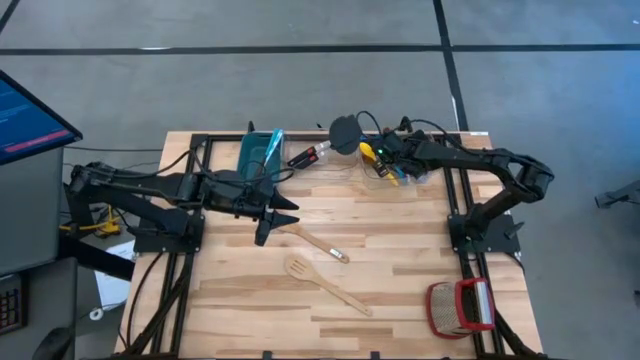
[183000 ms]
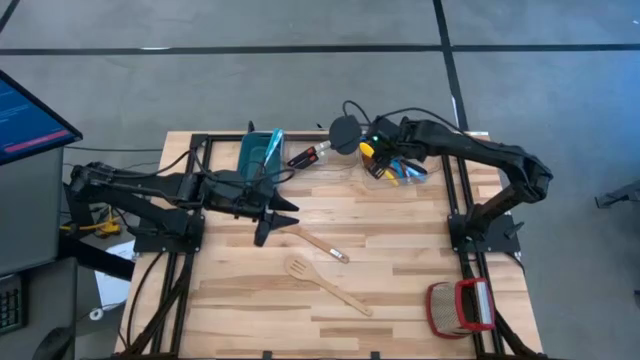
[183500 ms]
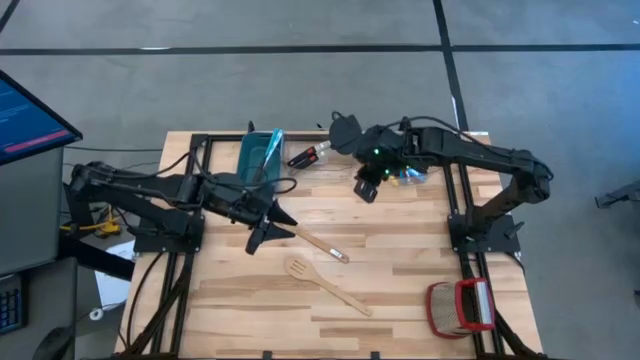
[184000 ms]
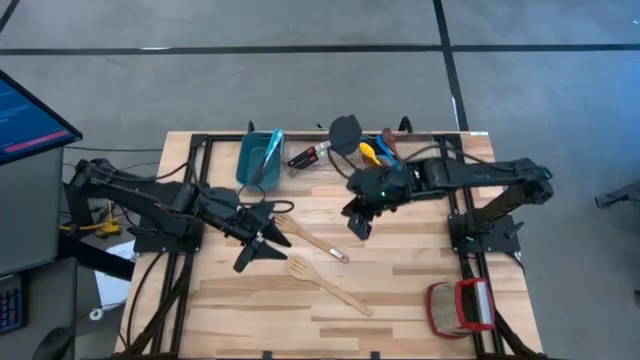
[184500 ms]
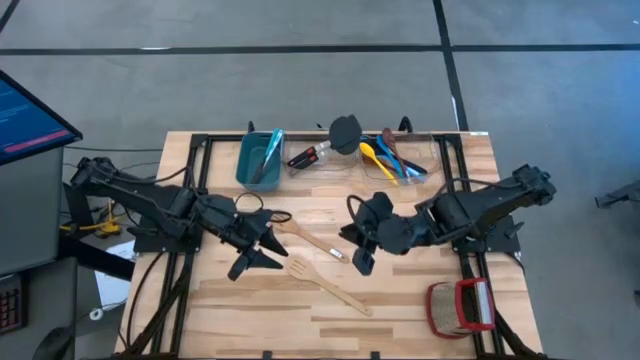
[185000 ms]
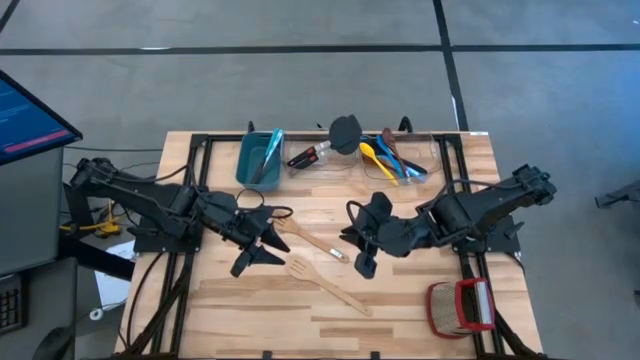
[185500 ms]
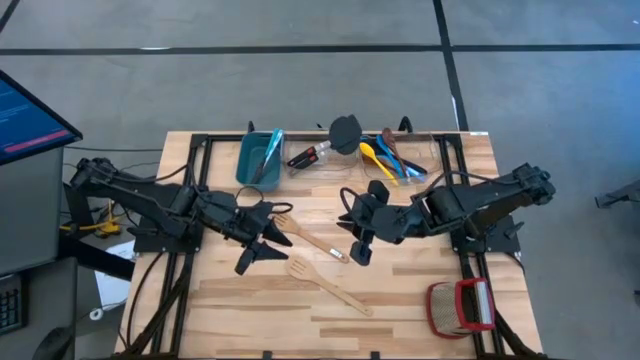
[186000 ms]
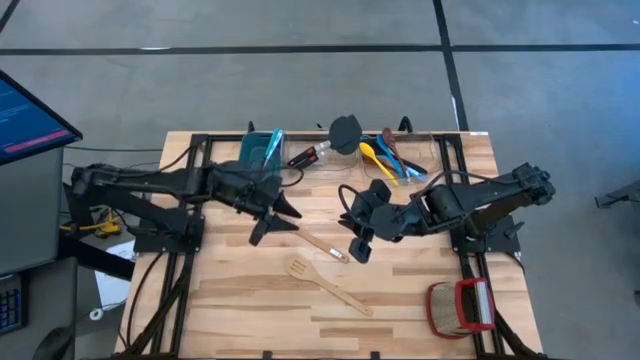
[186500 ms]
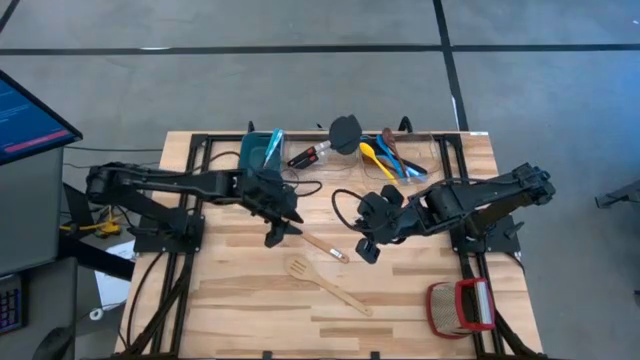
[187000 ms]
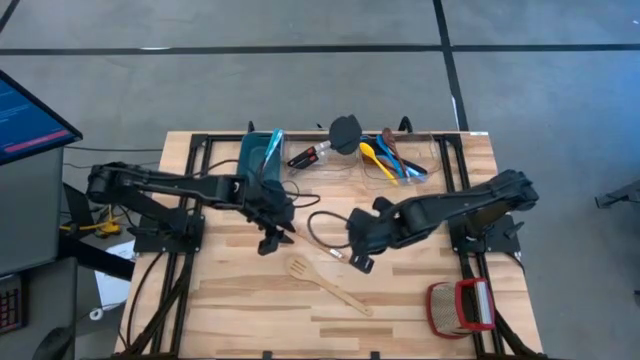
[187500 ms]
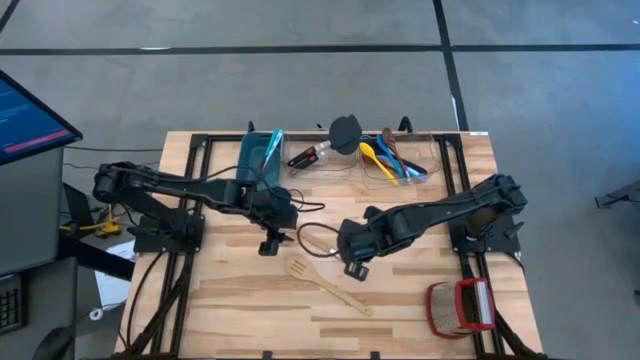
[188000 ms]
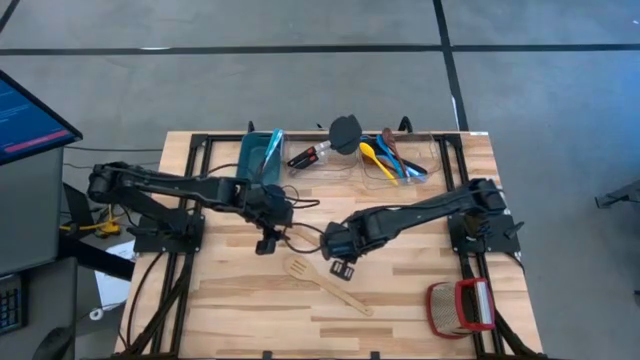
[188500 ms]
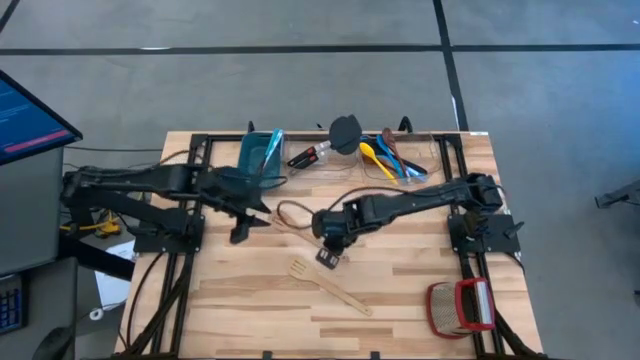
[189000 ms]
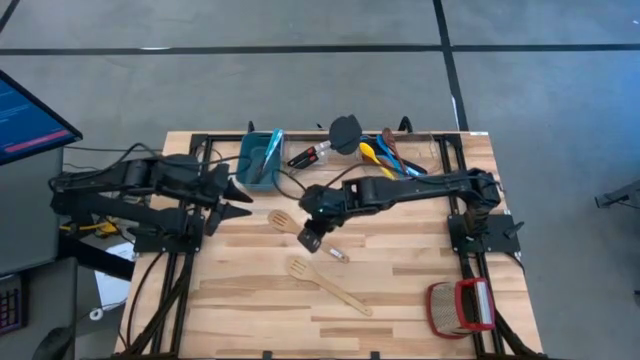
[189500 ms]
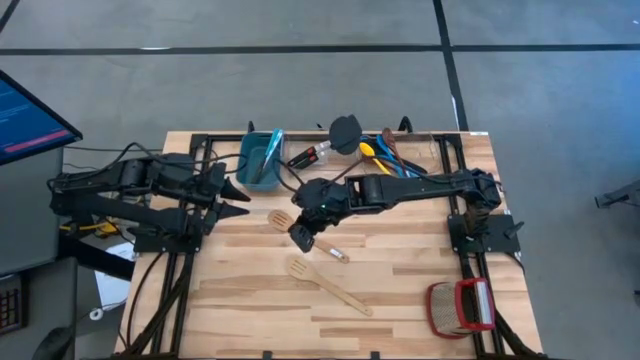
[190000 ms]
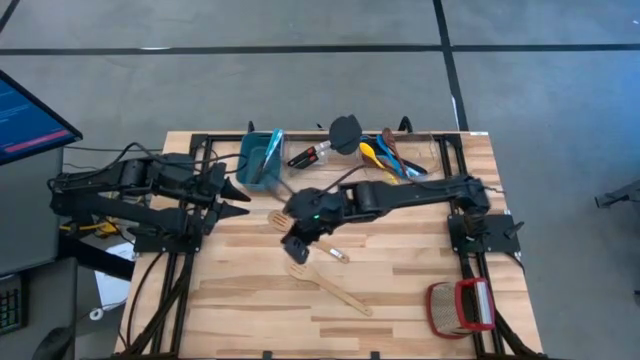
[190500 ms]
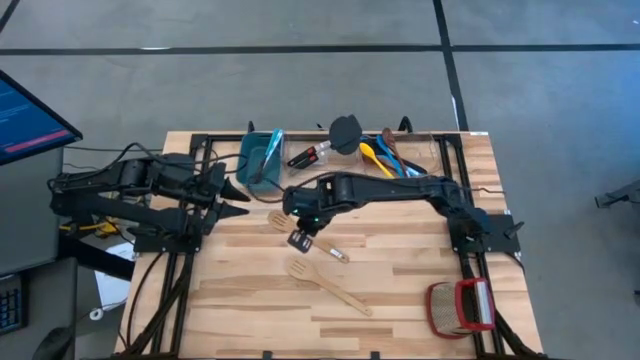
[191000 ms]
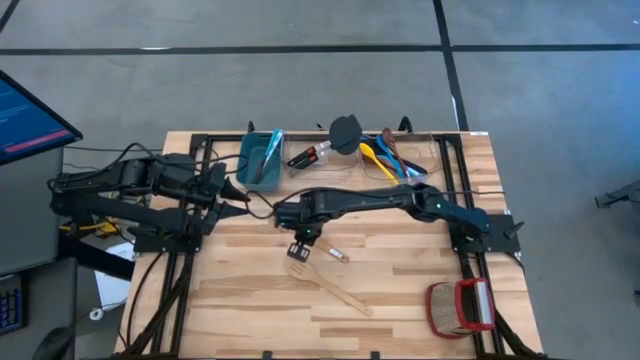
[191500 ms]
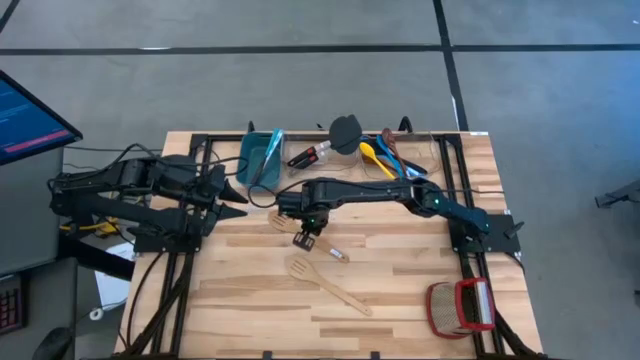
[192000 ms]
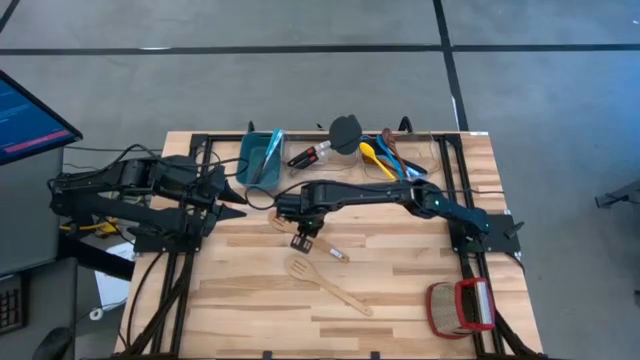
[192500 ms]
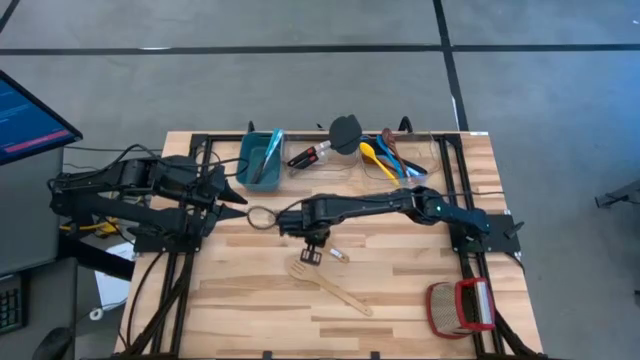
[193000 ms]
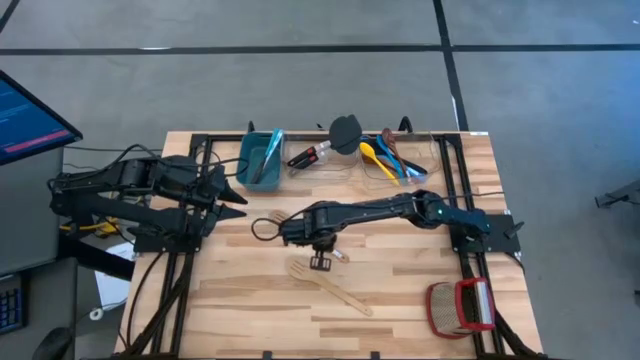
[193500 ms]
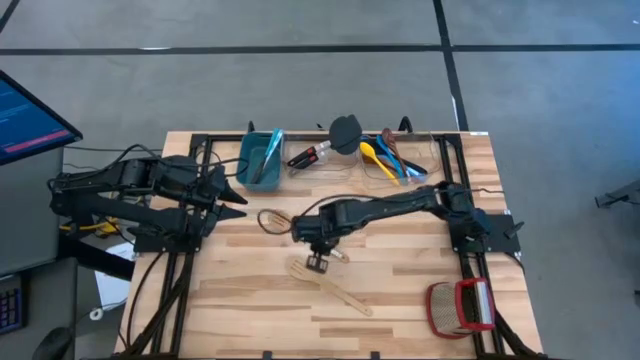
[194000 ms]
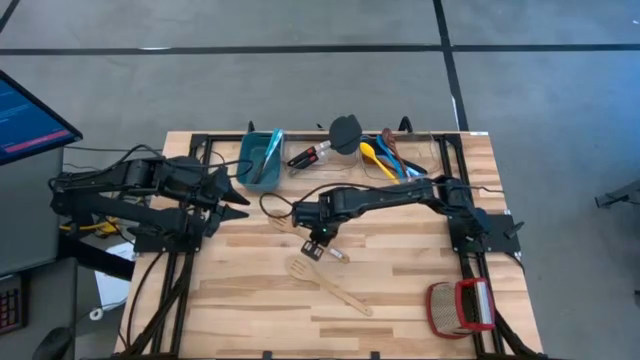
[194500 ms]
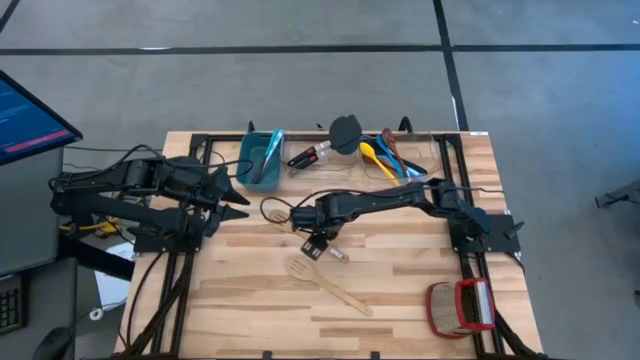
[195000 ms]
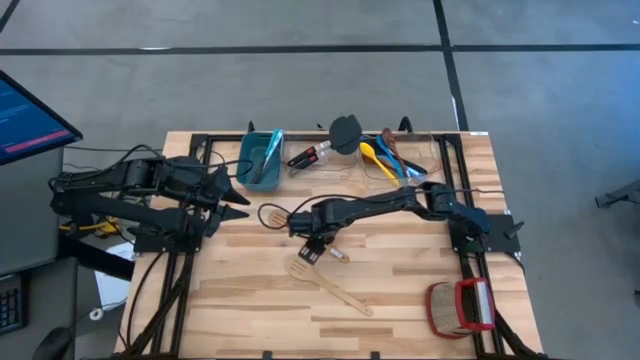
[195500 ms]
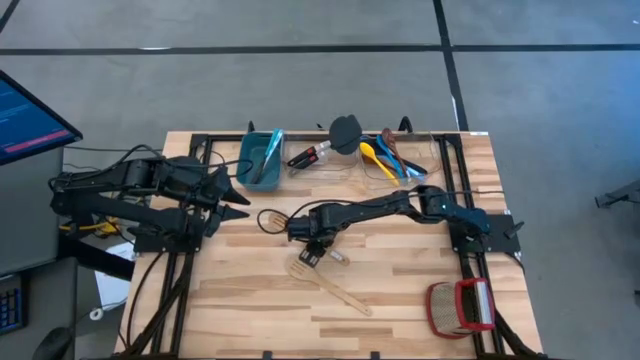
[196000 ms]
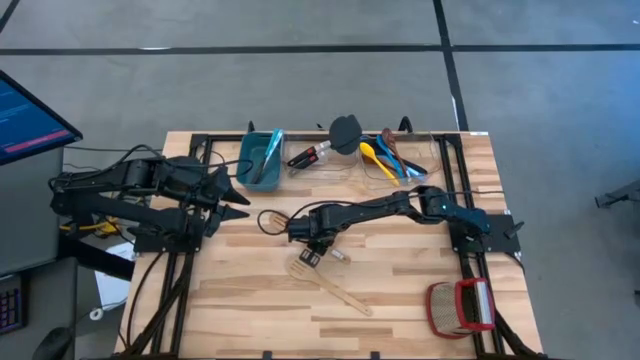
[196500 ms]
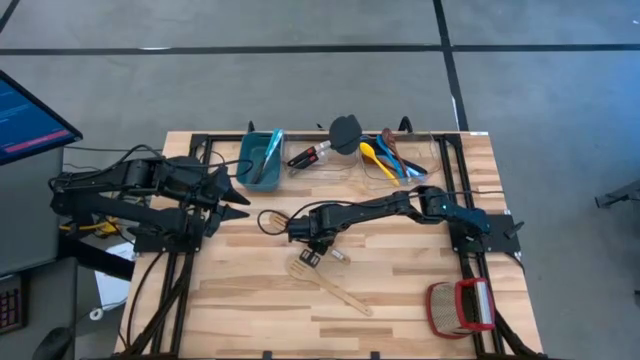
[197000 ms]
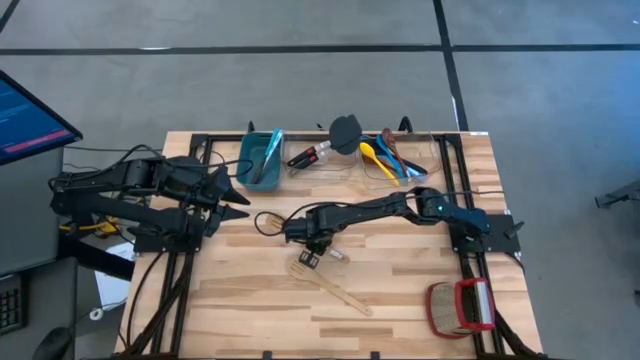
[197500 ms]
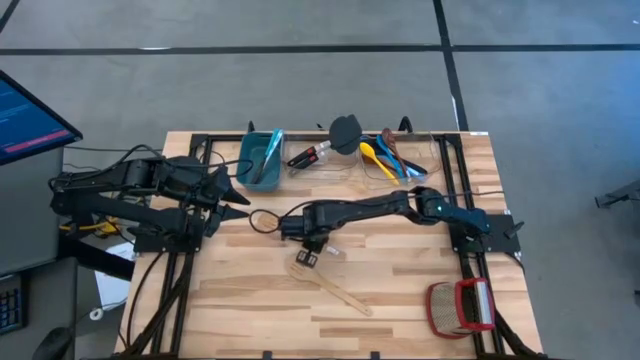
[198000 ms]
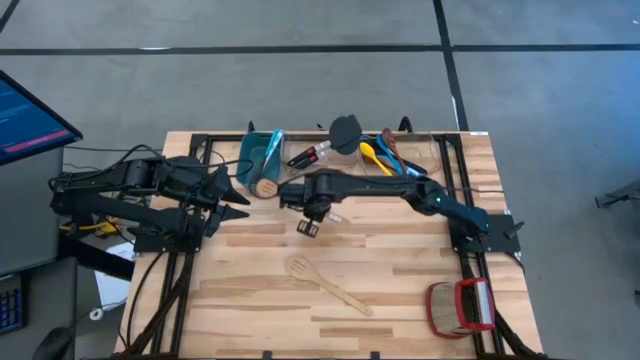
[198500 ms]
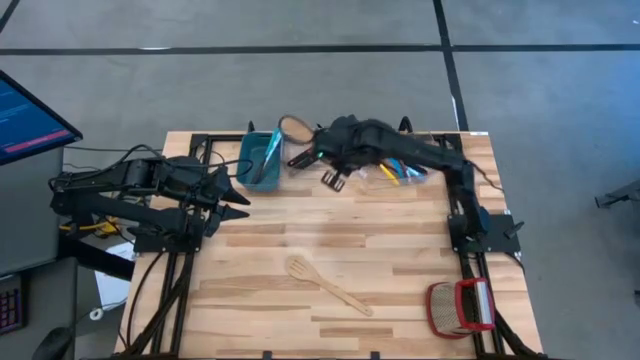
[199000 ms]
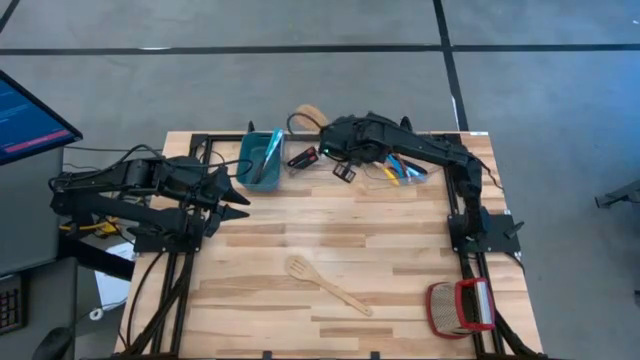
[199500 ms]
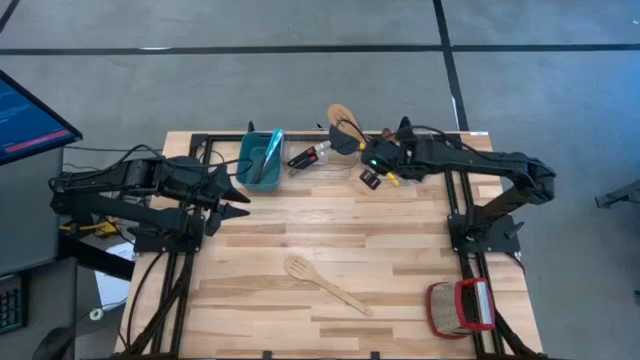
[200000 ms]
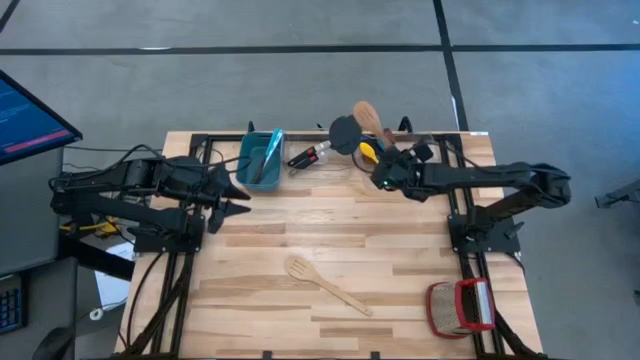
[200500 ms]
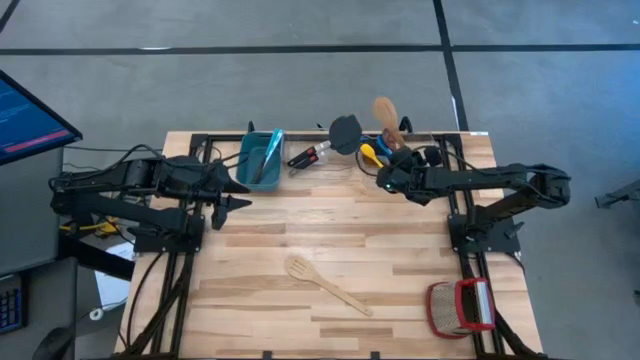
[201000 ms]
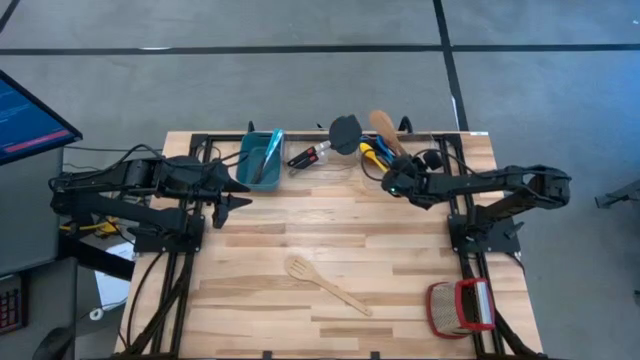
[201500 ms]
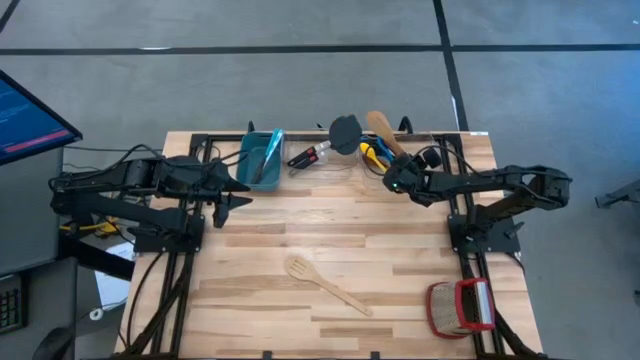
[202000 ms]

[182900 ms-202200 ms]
Task: Pick & Place Kitchen Items
Put the brown slotted serving spoon into the right transparent bin

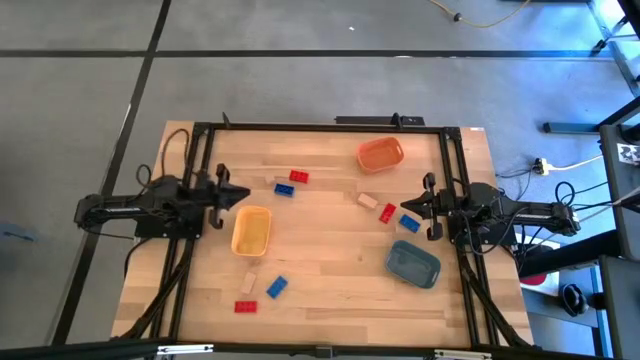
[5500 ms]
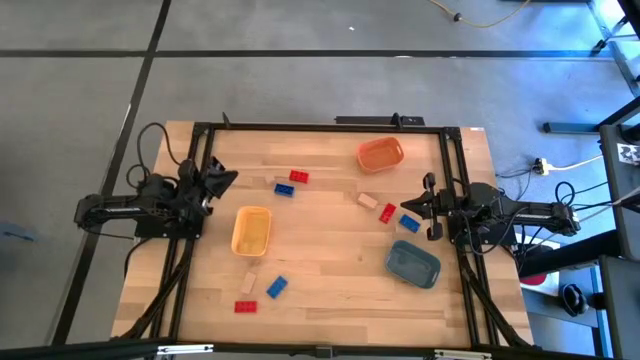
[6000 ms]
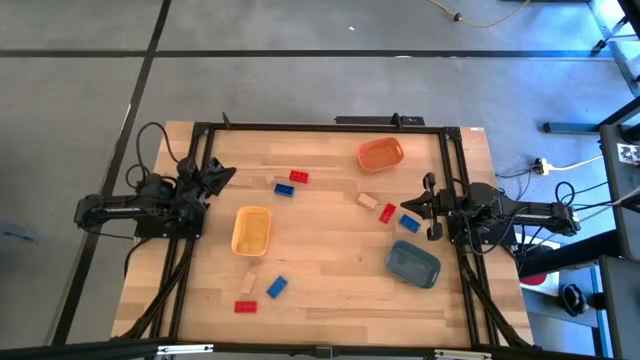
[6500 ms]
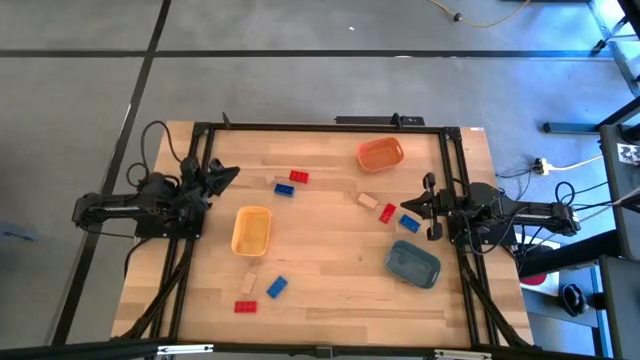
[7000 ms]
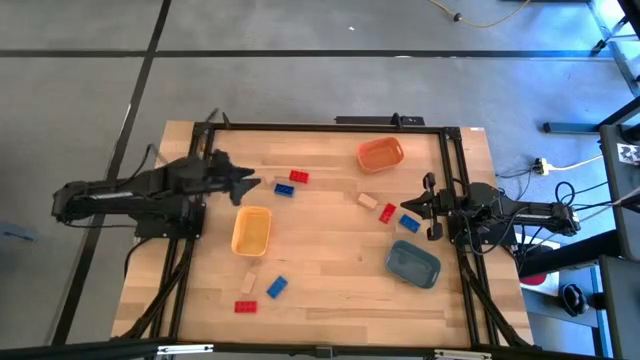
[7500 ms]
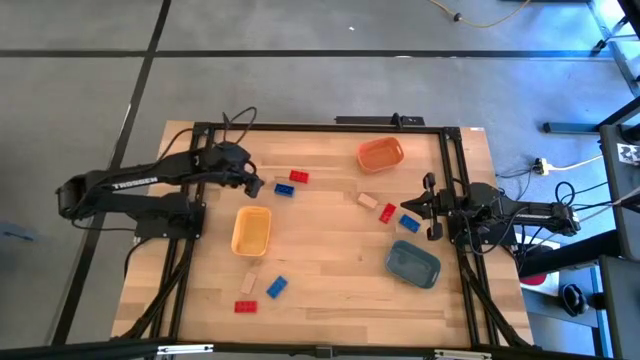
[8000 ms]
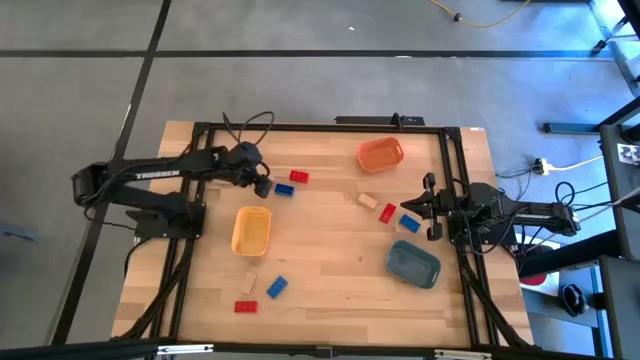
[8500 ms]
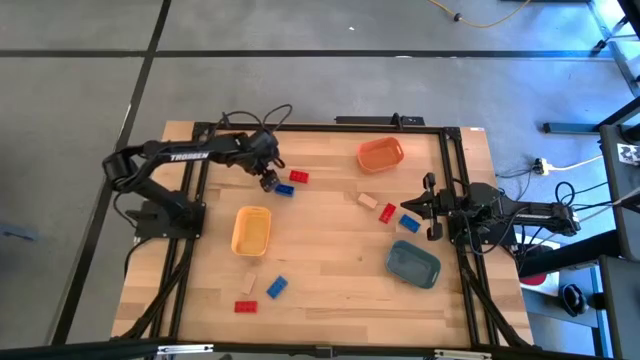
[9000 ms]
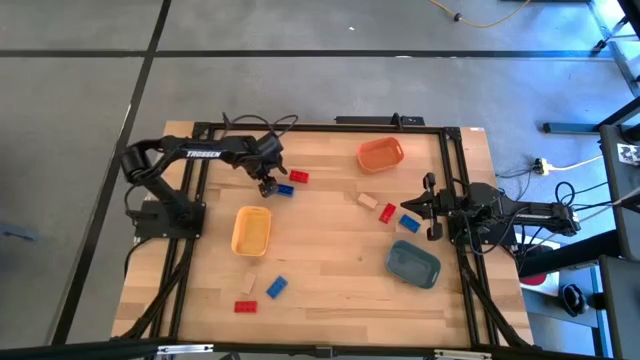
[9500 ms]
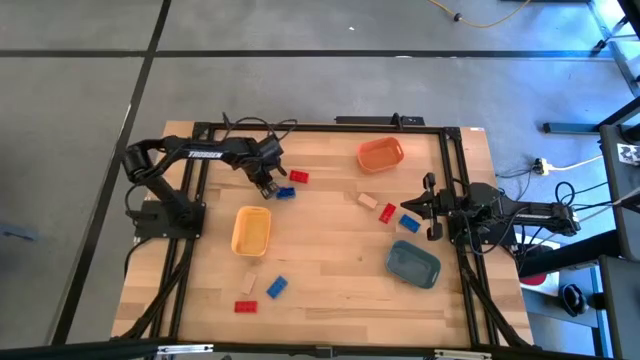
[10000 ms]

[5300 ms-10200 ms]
Task: Sort & place blocks by color
Put the top left brown block into the yellow bin
